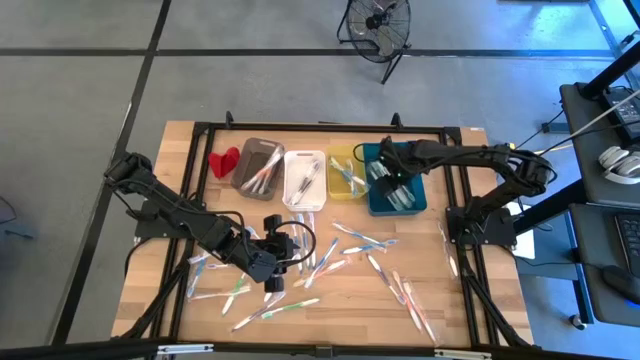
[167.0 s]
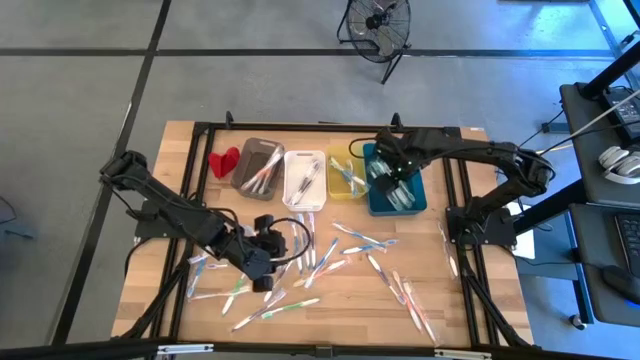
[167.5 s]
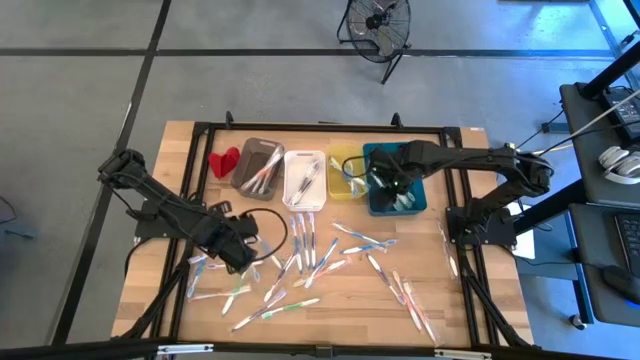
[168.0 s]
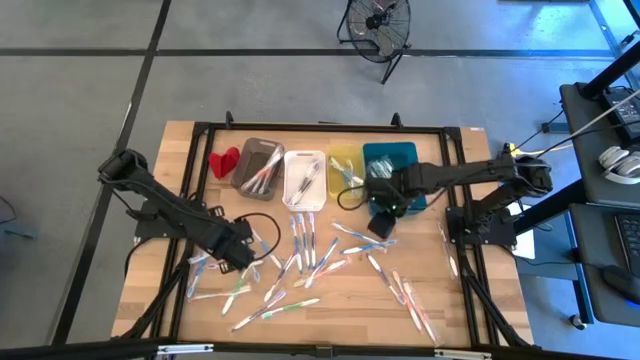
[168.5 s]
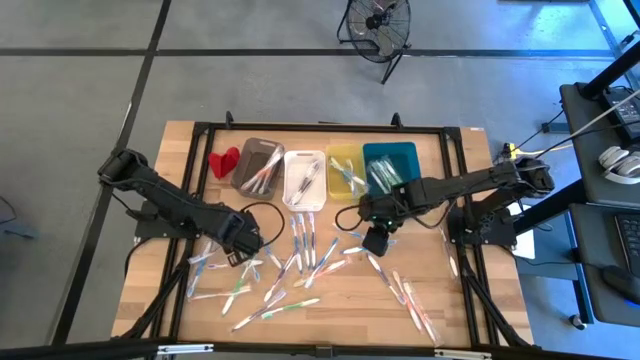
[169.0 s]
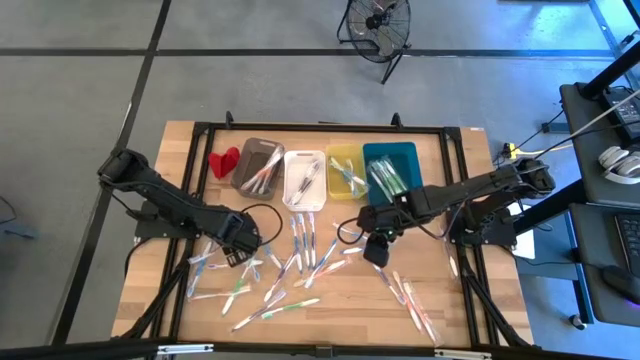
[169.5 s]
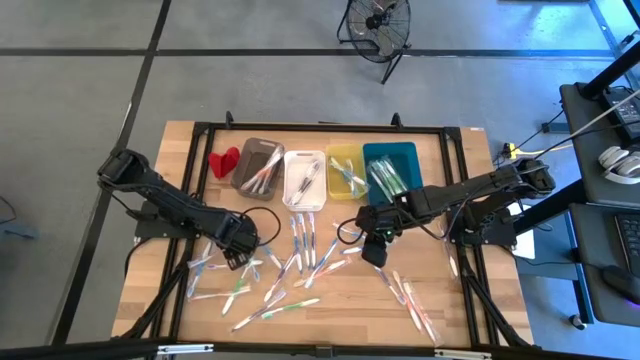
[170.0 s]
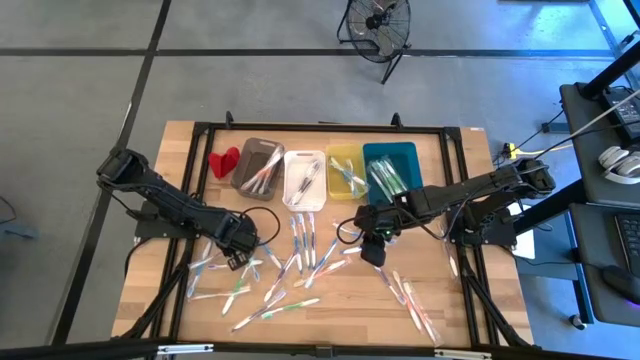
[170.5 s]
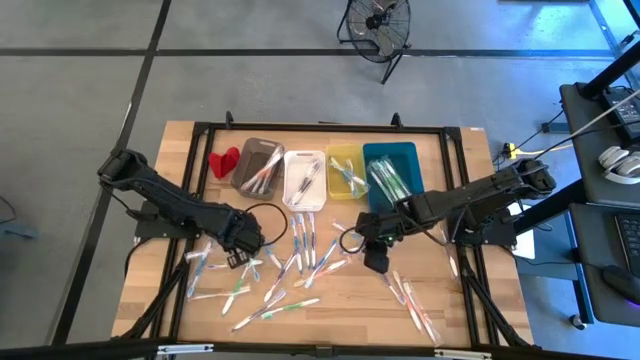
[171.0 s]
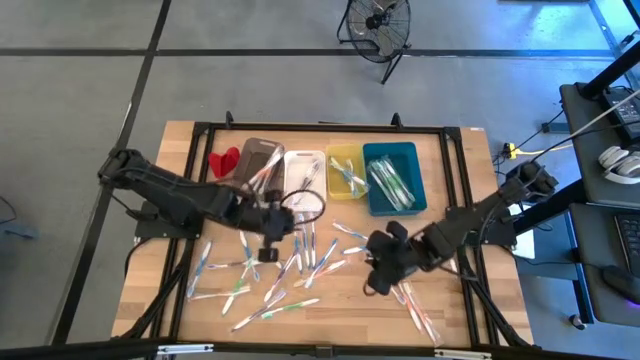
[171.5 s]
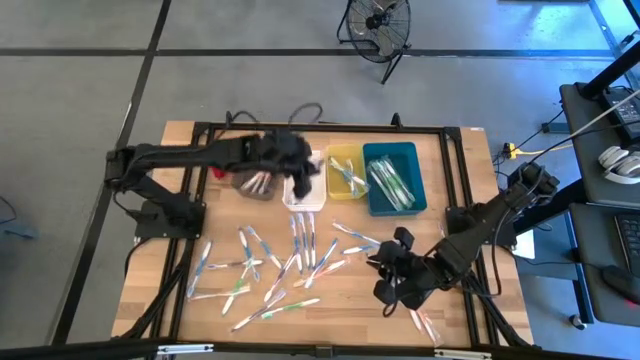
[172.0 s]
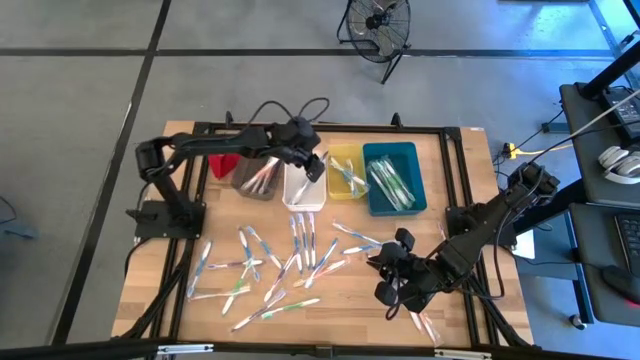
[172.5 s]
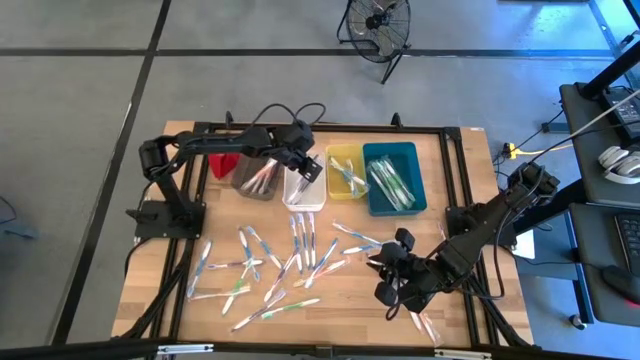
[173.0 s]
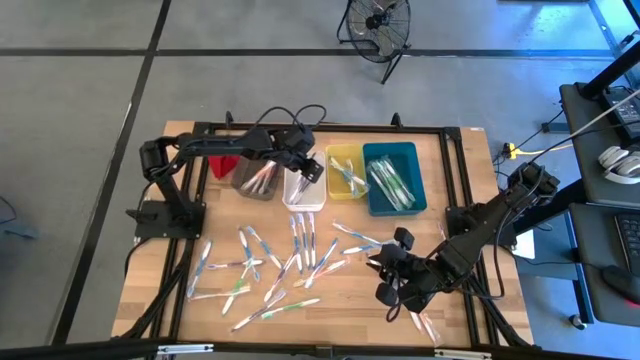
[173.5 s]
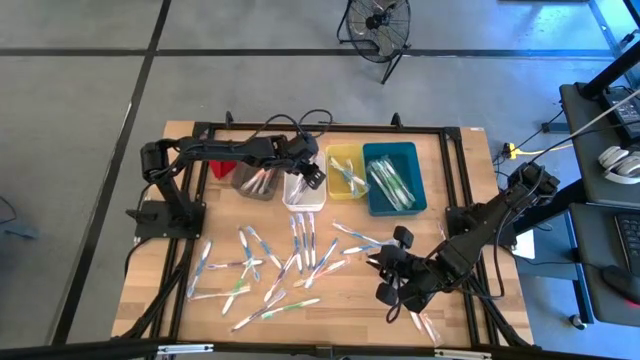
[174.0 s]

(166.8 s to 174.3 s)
Task: Pick & Place Toothbrushes
Put the purple toothbrush into the white bin

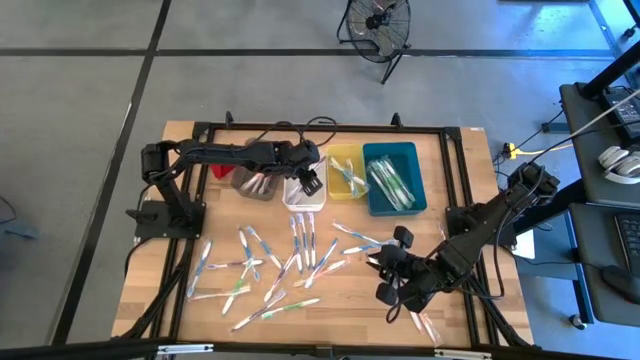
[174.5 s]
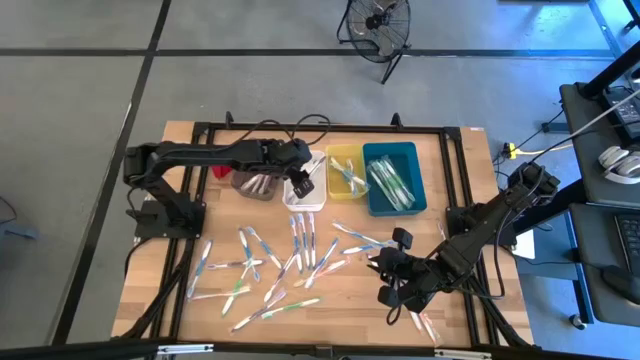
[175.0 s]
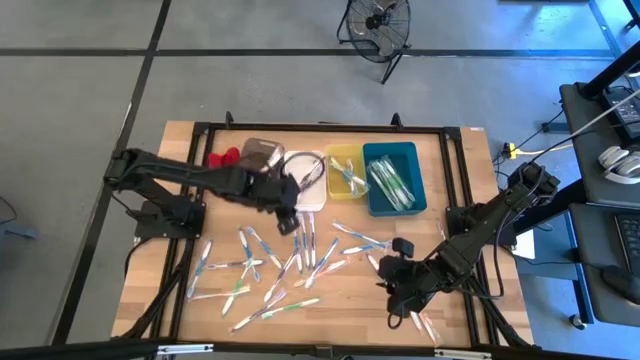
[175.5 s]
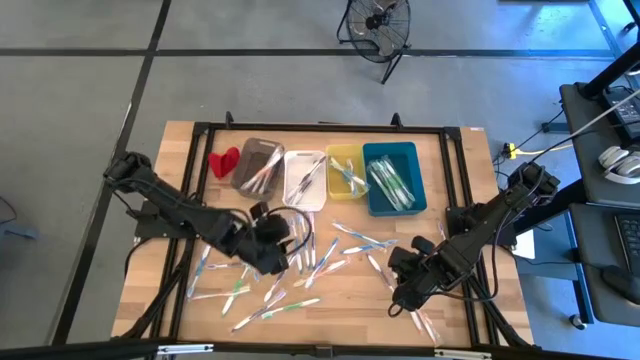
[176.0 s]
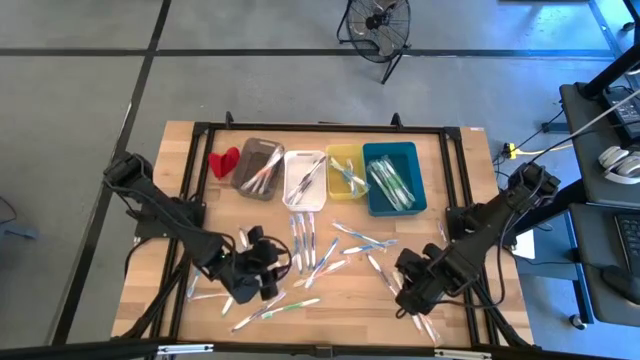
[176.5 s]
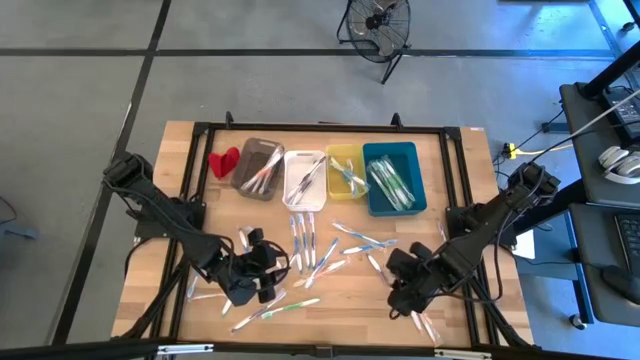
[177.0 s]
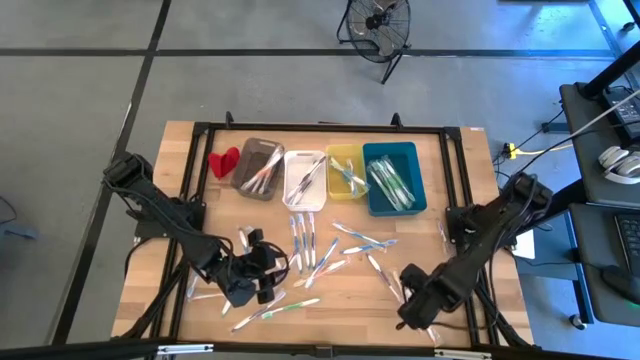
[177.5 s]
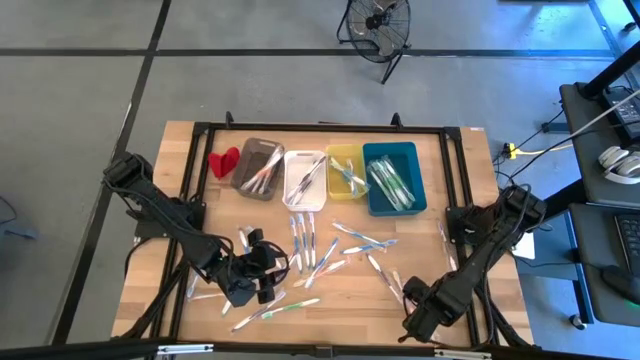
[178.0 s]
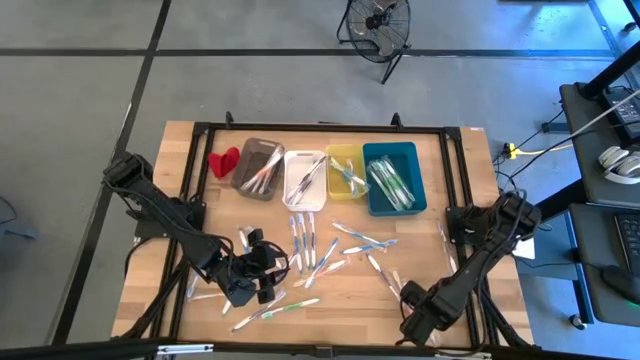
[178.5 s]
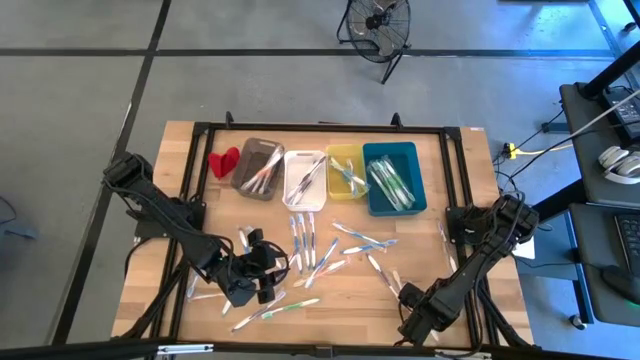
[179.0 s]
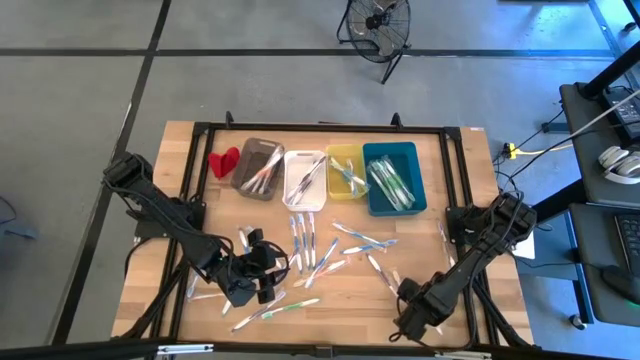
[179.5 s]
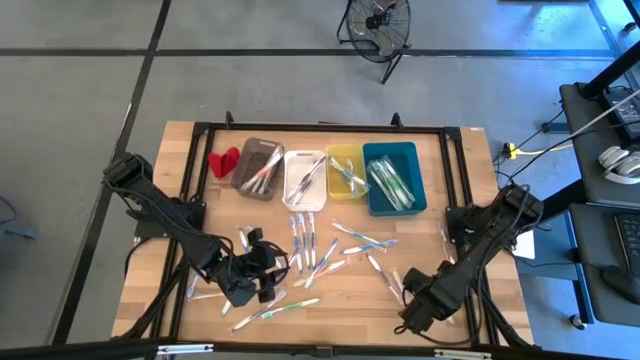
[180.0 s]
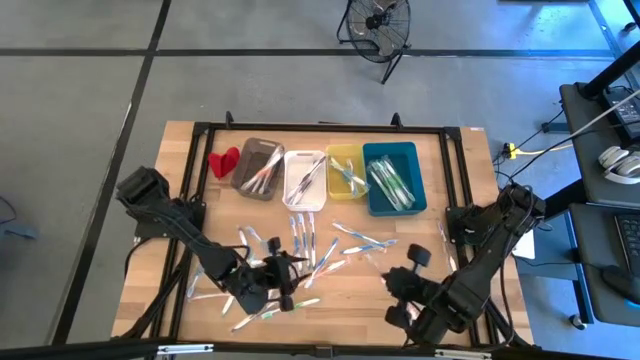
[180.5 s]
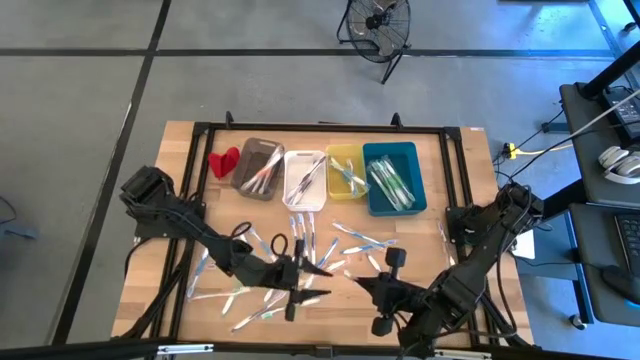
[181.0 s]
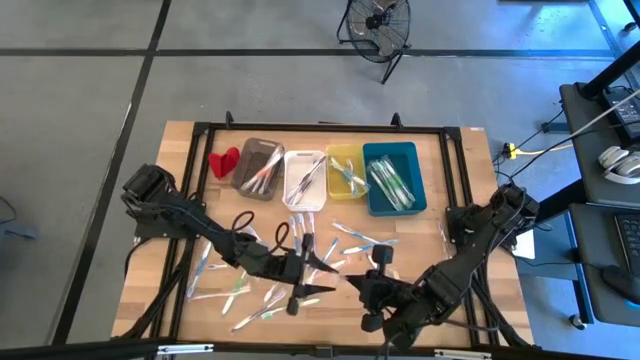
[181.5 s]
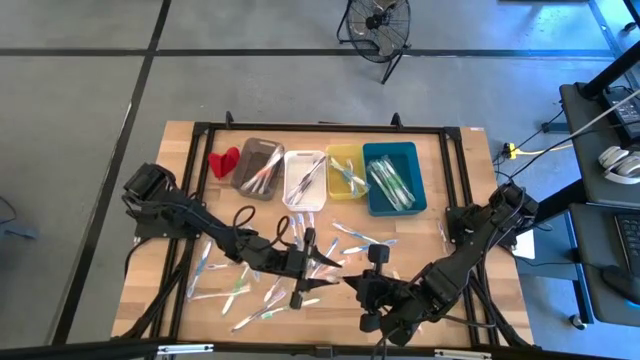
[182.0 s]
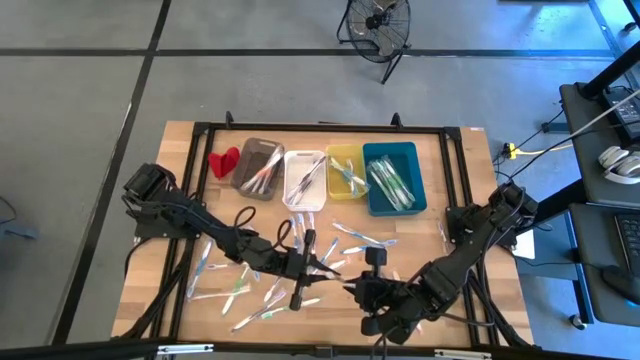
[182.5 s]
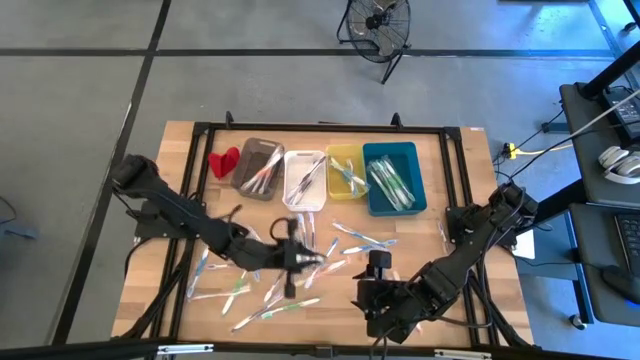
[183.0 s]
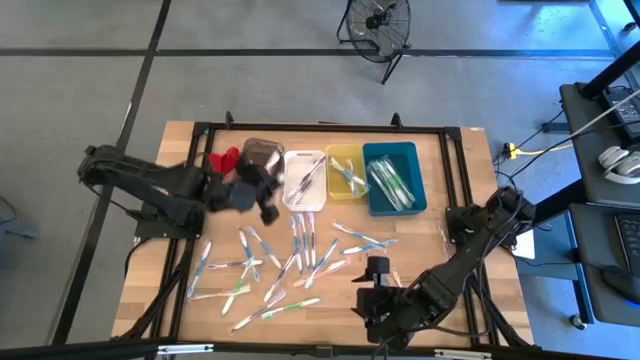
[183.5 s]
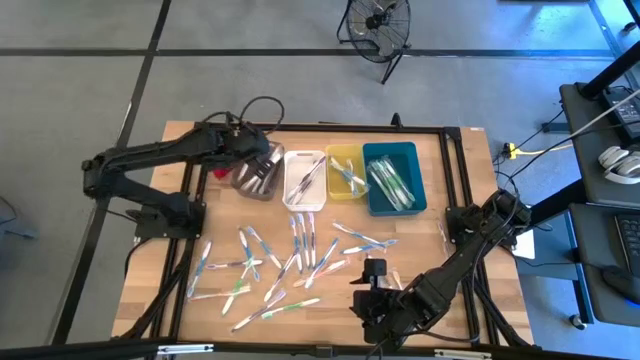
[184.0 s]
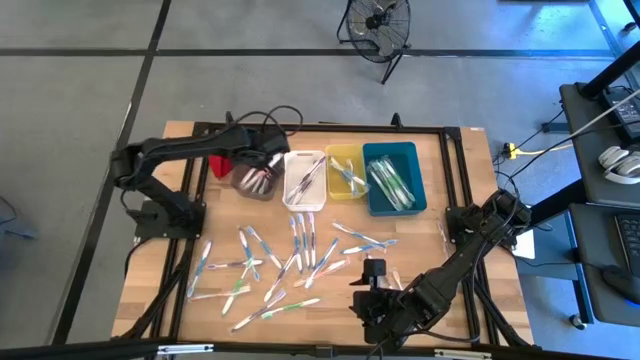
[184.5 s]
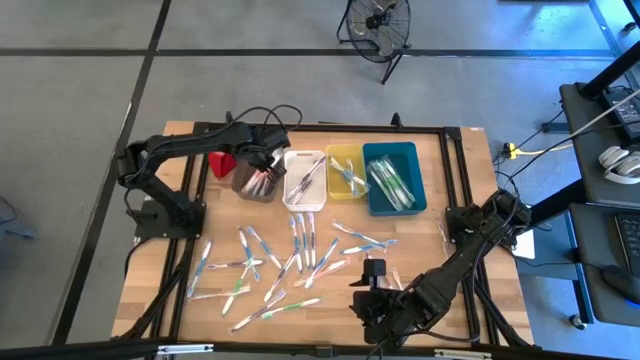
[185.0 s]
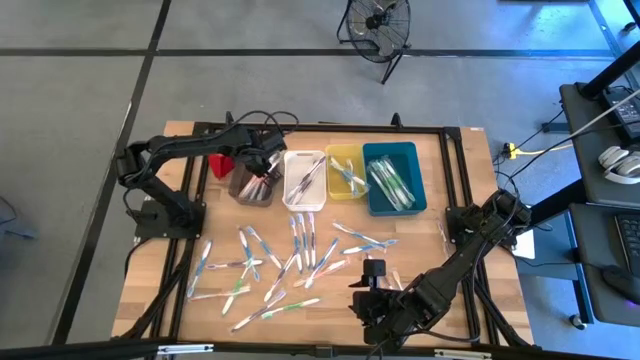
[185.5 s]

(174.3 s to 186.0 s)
Put the orange toothbrush into the black bin

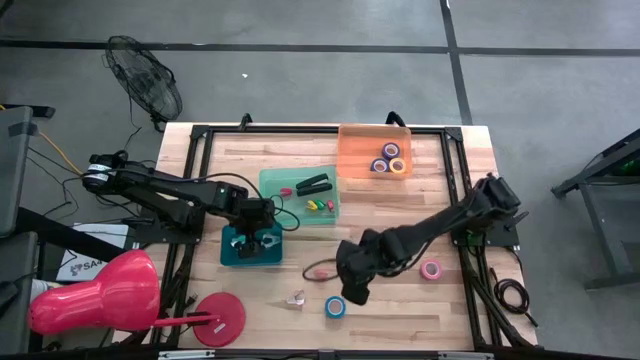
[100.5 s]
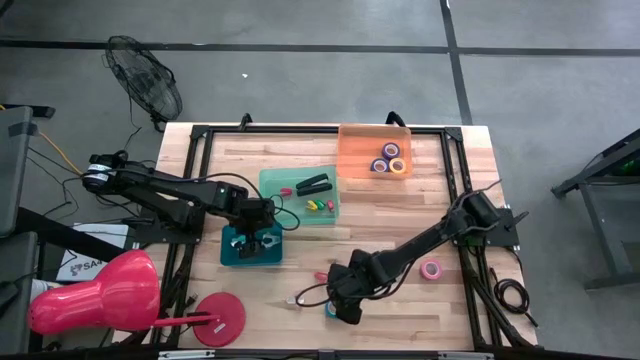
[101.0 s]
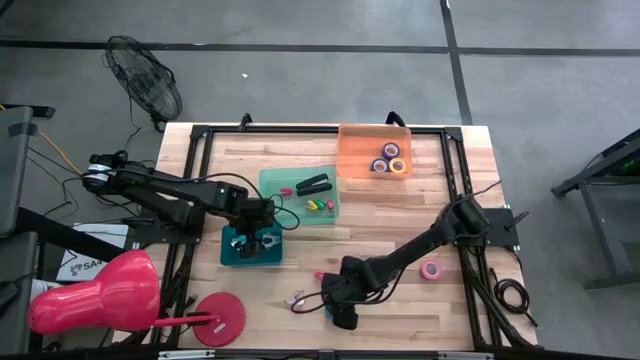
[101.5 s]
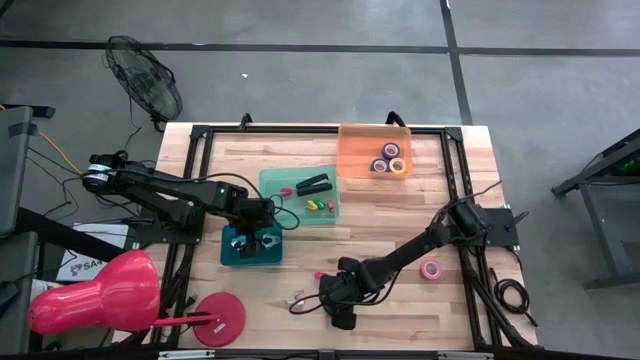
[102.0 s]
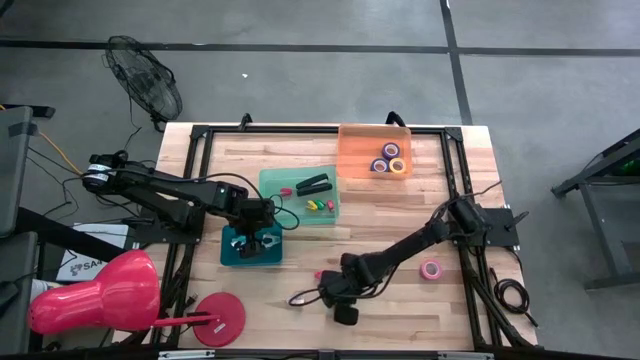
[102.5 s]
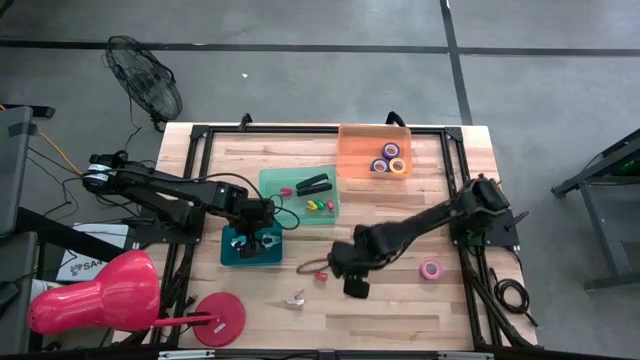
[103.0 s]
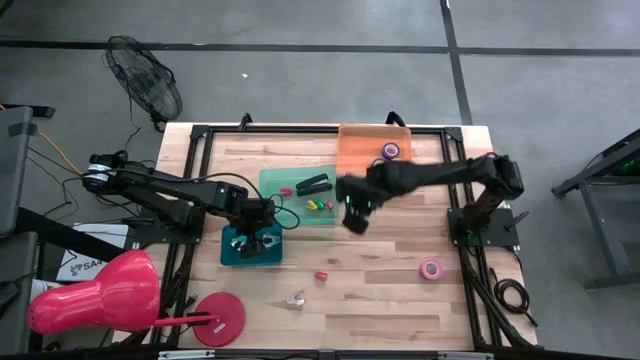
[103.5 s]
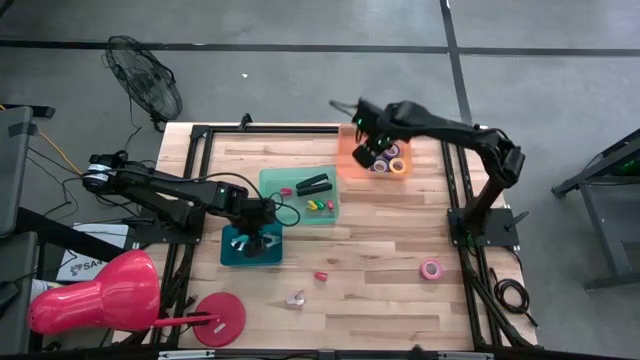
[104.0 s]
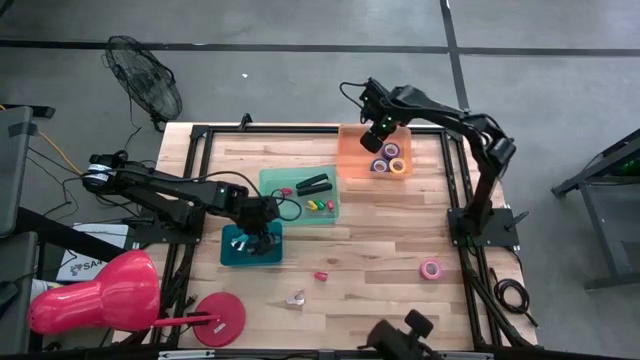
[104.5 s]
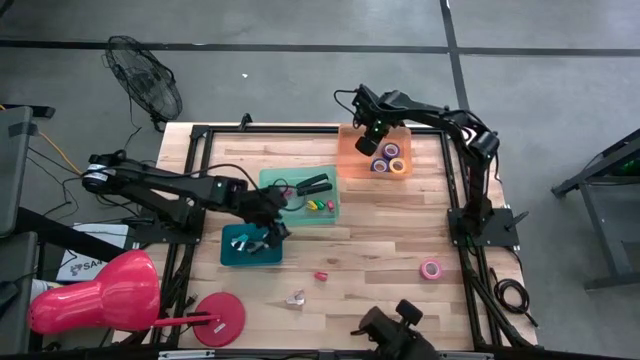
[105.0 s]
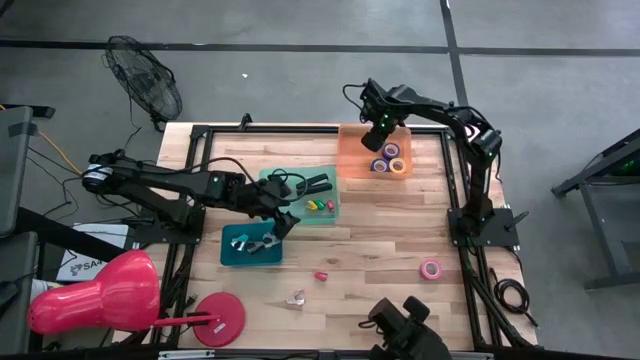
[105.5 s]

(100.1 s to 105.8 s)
Task: Pick and place Stapler, Stapler remover, tape
Put the light blue tape in the orange bin
